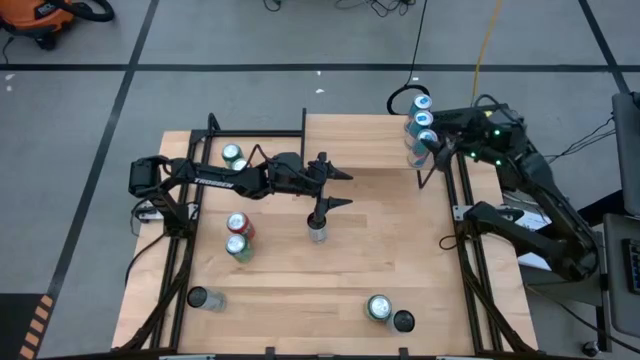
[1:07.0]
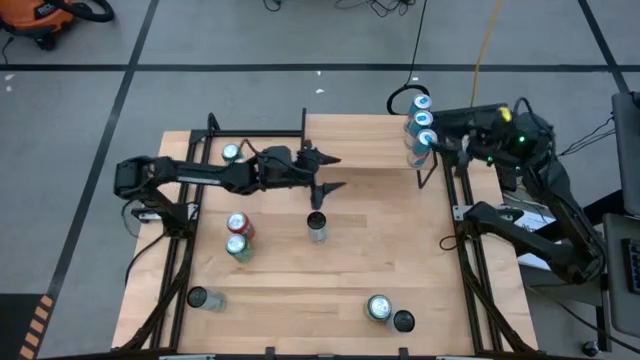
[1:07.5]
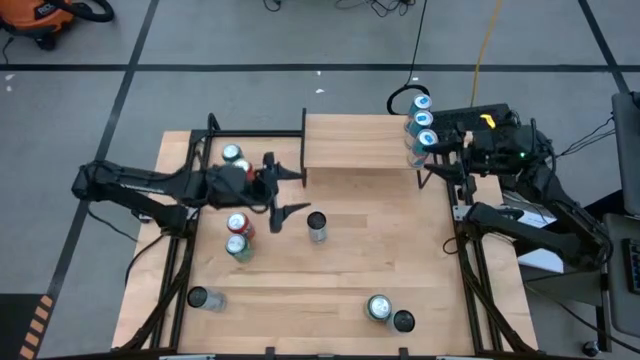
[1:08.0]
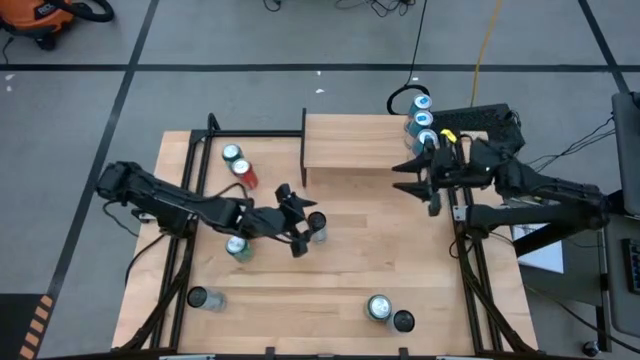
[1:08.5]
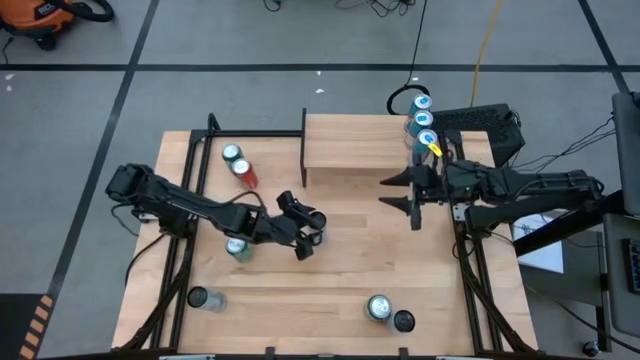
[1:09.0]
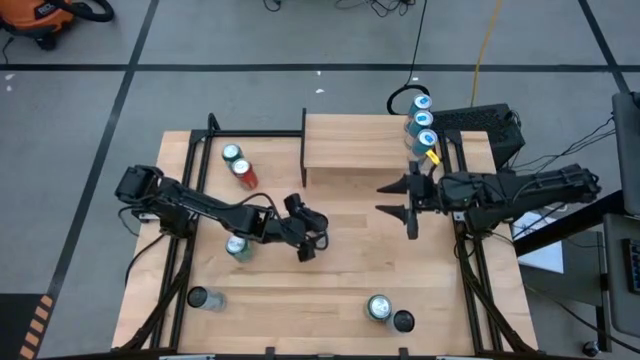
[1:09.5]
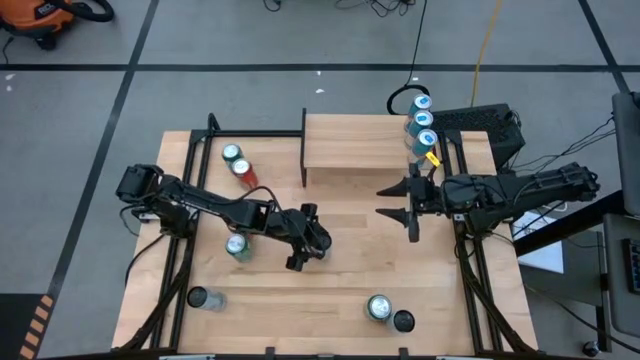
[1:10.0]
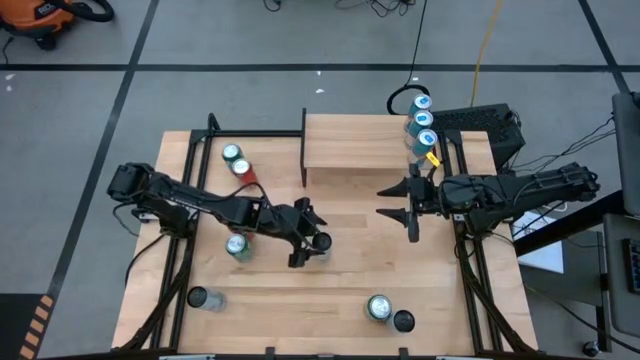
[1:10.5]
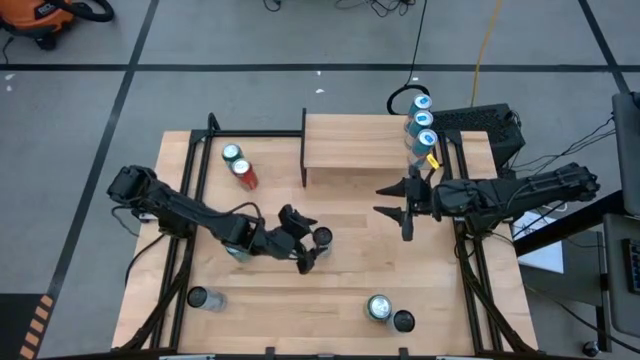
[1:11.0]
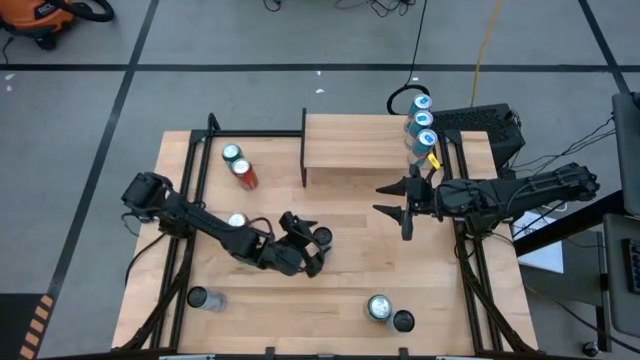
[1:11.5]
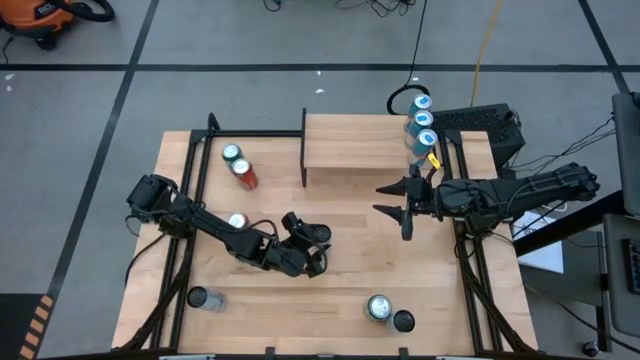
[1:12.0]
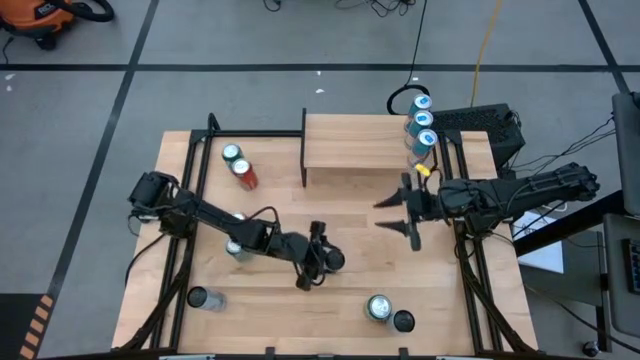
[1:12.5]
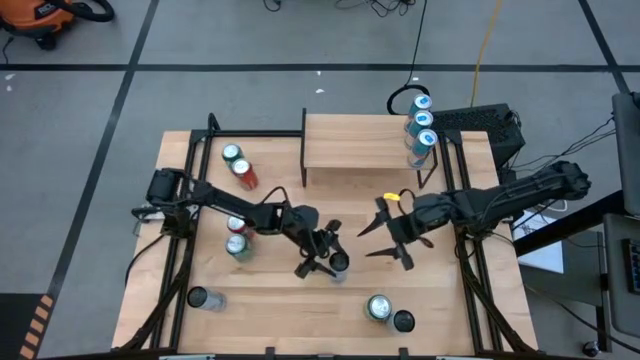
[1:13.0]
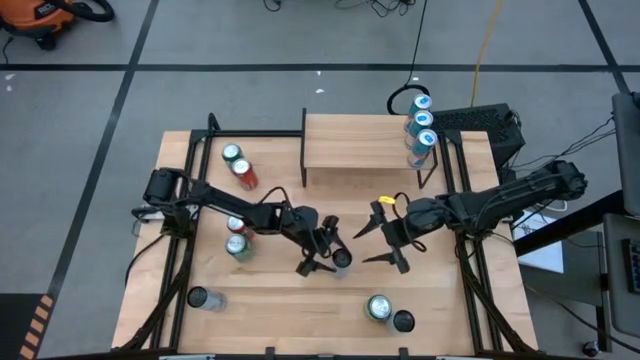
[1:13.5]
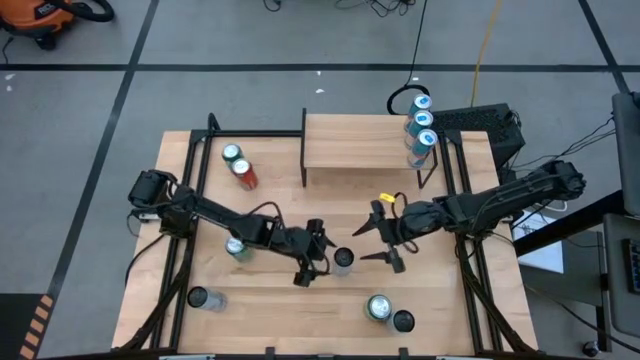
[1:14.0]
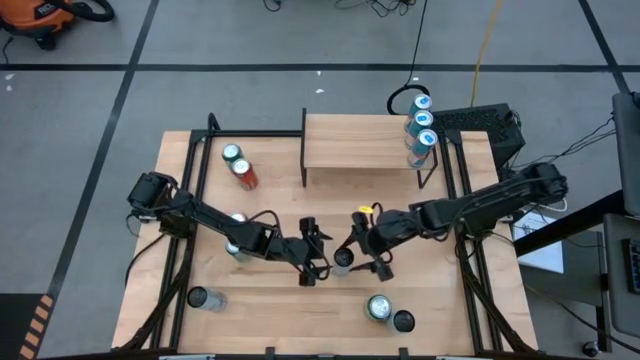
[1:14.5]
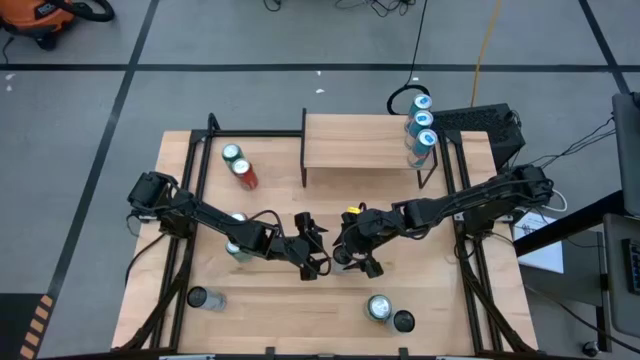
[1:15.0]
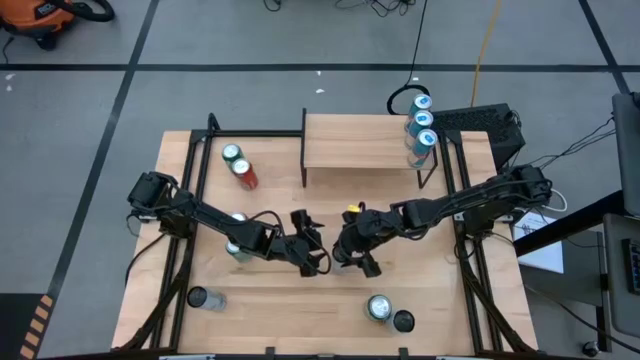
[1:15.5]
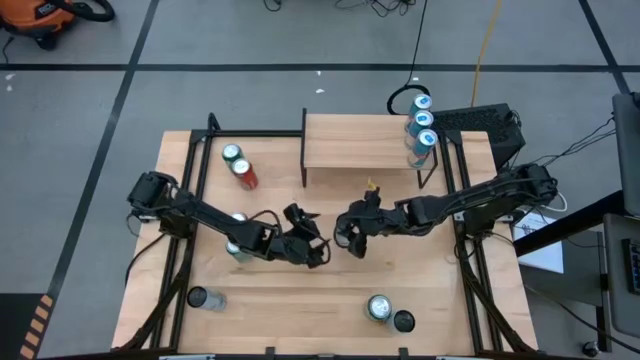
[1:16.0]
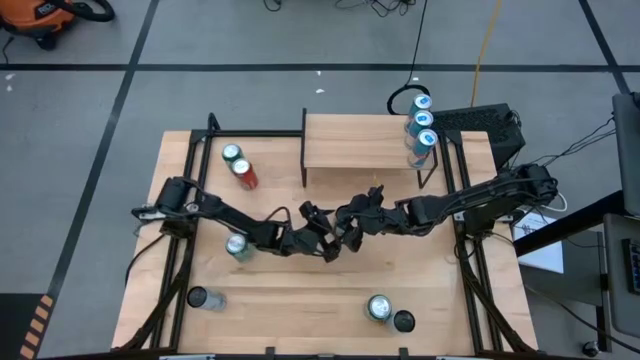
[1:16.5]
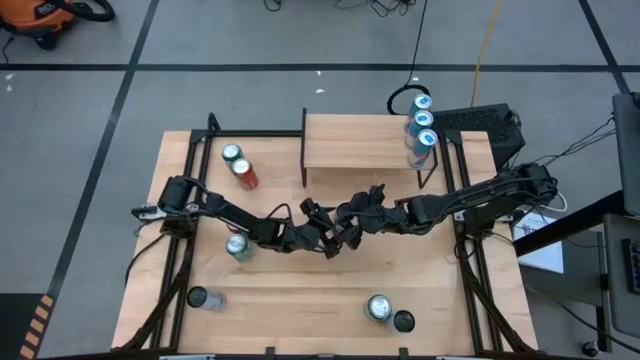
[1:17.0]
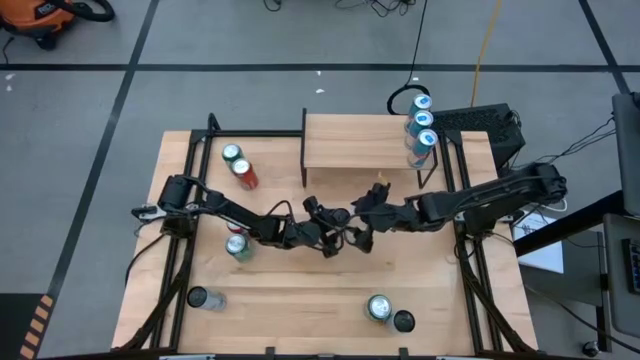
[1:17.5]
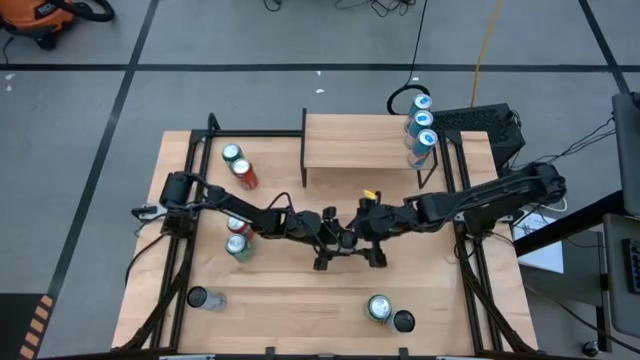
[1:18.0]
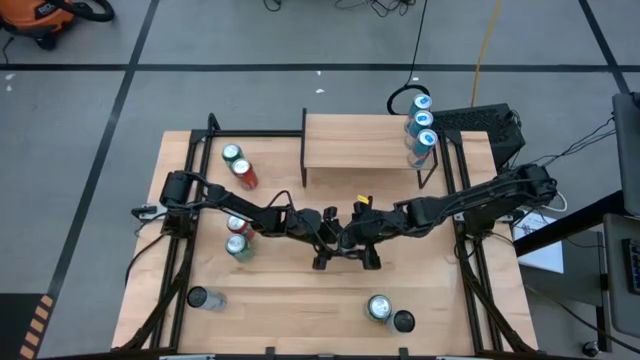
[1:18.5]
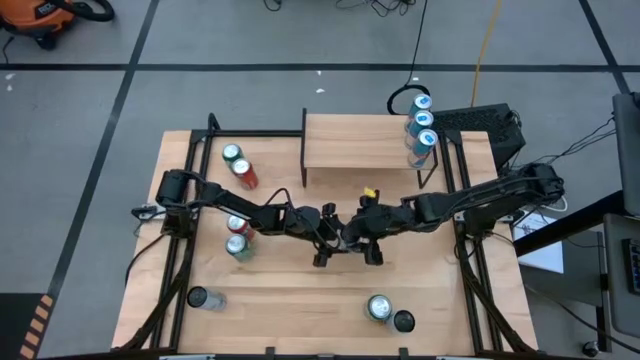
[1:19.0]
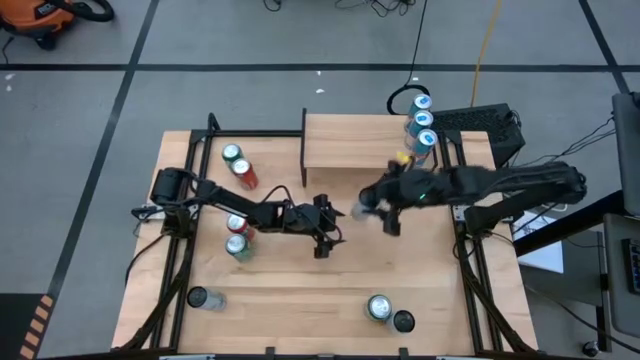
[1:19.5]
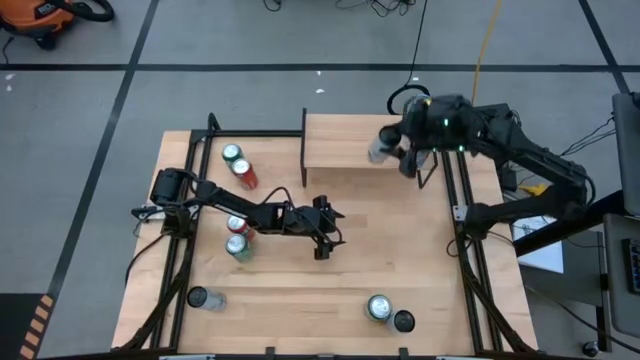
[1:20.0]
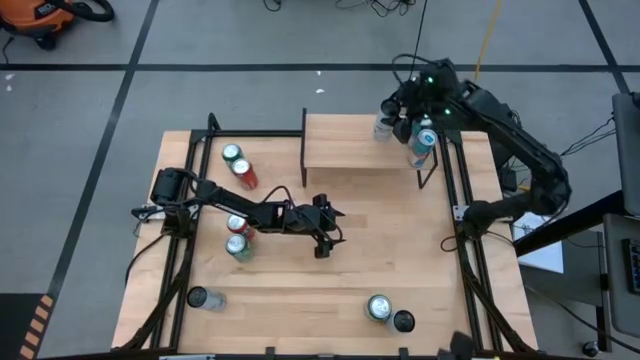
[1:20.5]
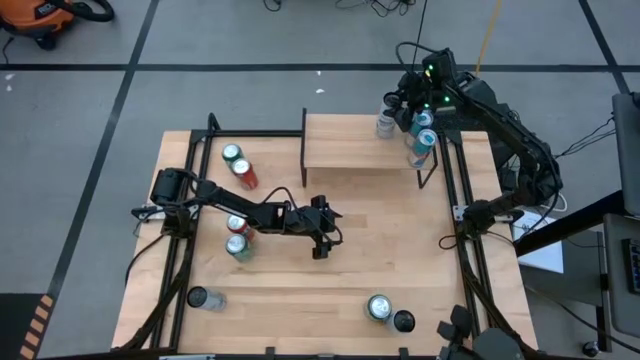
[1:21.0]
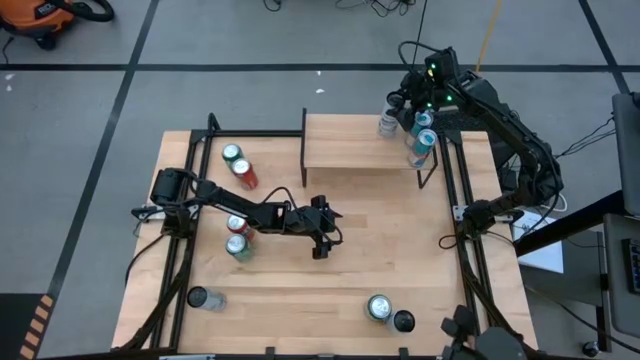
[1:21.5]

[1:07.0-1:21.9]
Task: Place canned beverage on shelf
Put the top white blue soda can on the shelf

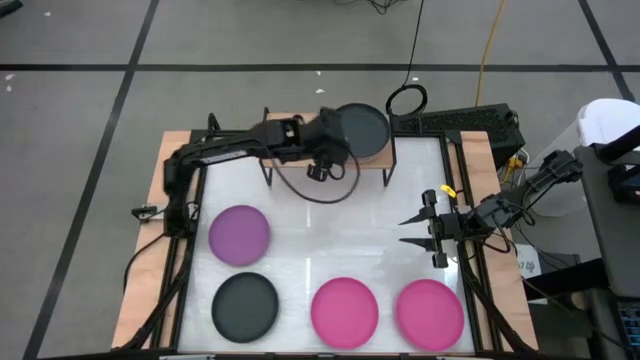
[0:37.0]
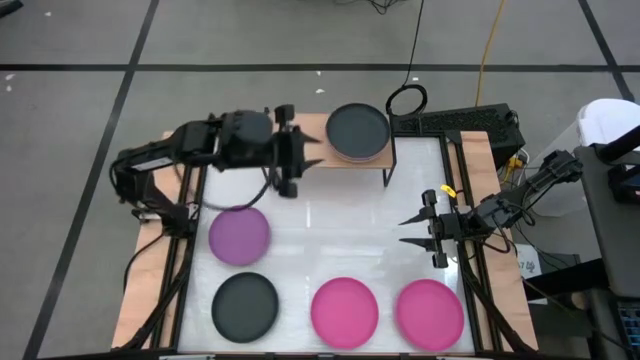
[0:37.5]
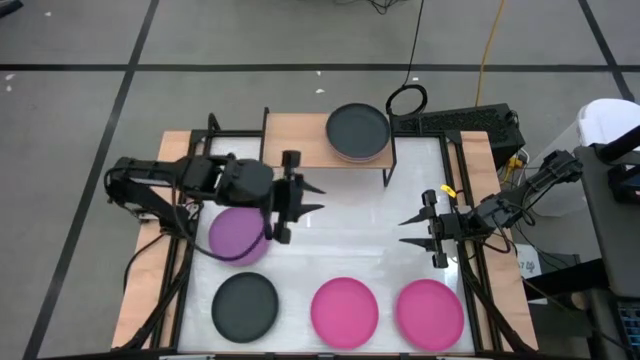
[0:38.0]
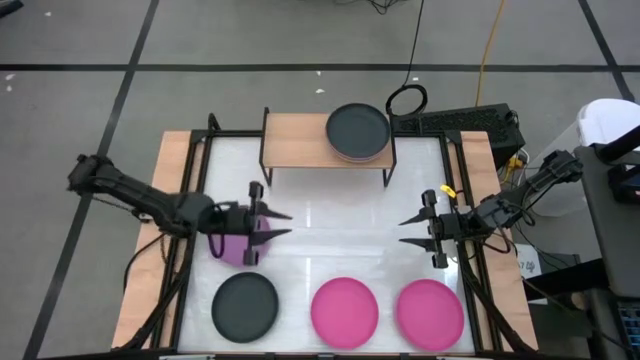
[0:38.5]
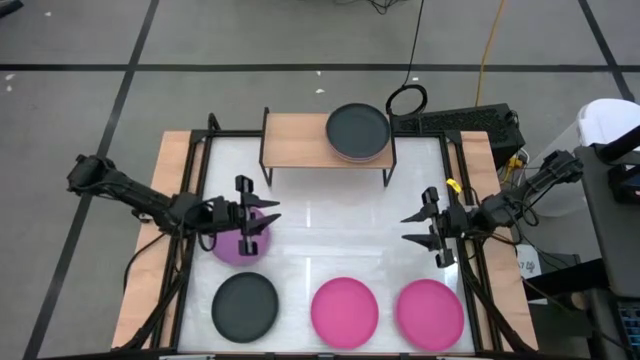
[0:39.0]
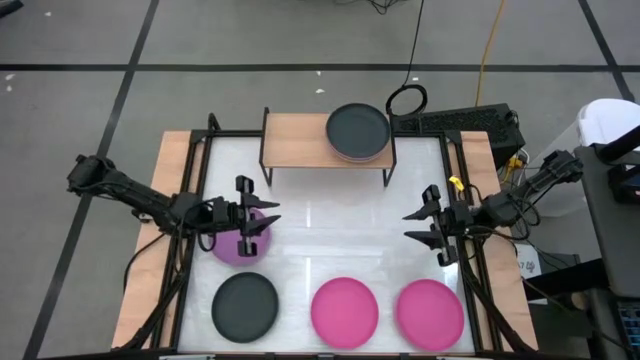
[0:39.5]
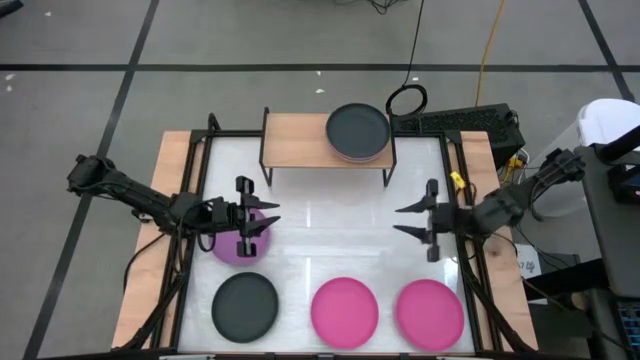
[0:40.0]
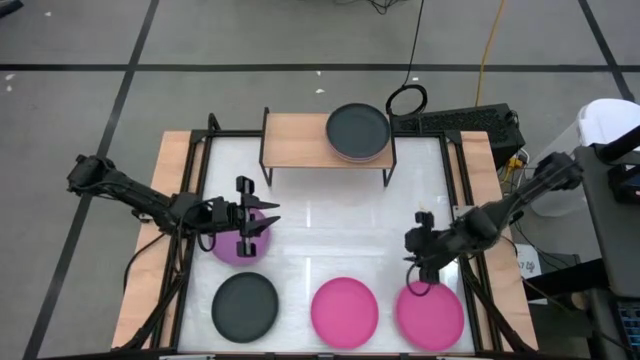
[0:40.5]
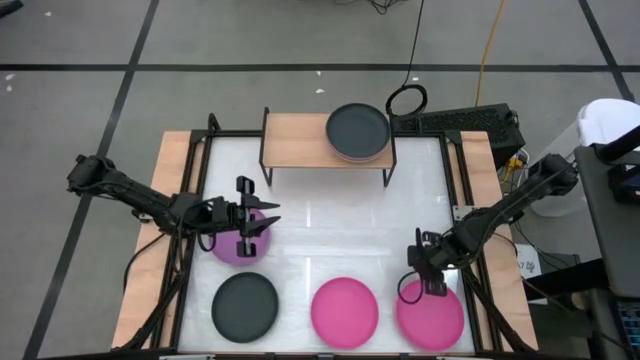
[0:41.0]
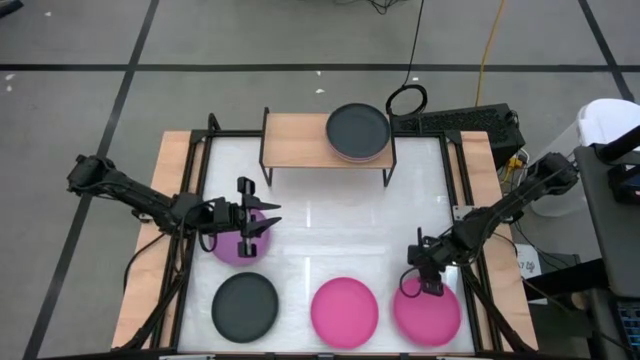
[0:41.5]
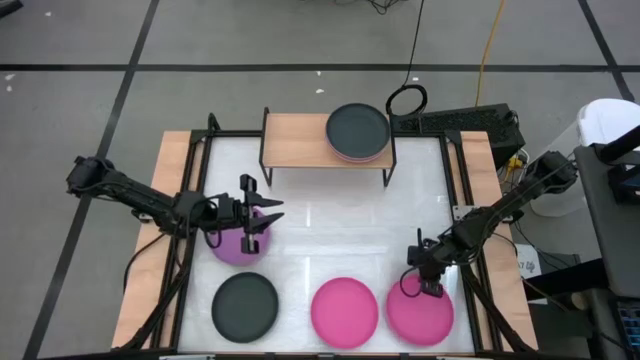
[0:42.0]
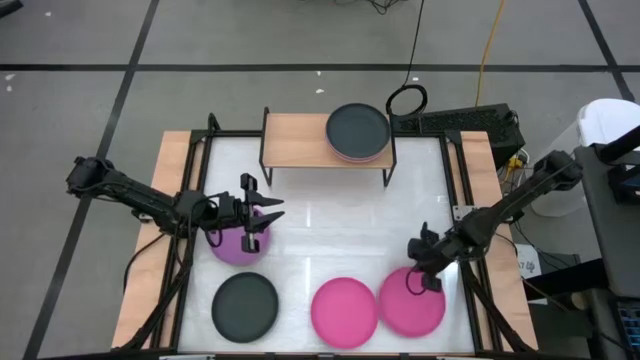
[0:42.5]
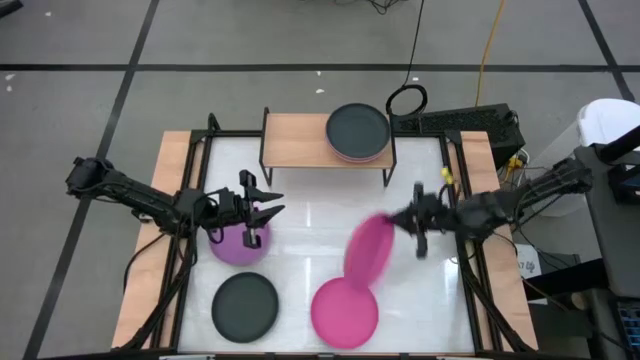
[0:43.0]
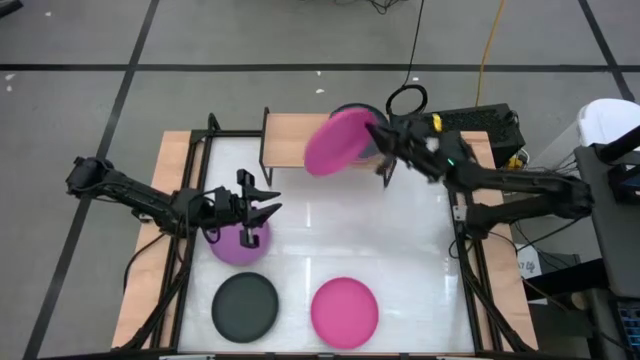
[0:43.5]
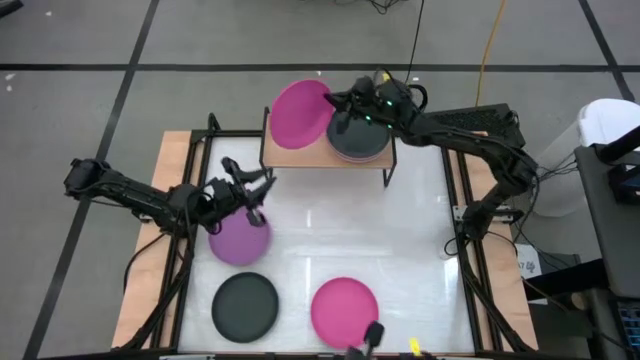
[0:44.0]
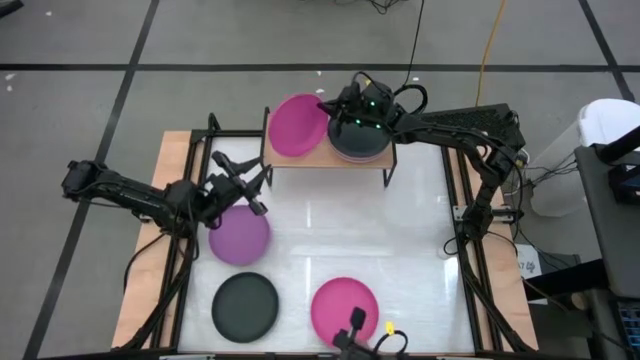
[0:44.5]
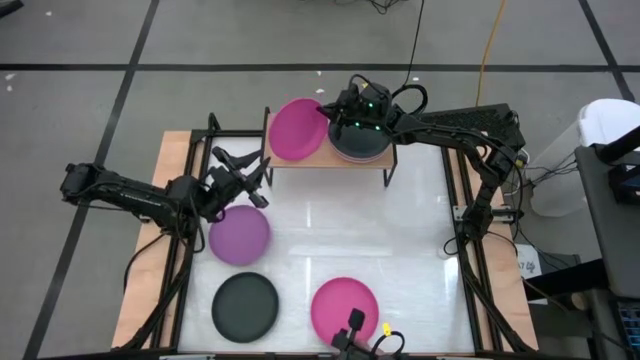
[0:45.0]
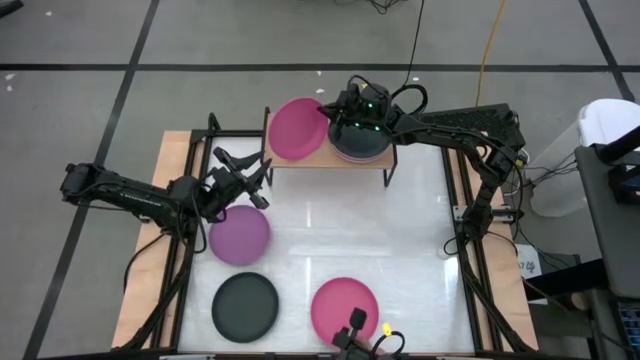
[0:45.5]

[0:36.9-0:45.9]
Task: Place and stack plates onto a shelf
Put the right pink plate on the shelf
